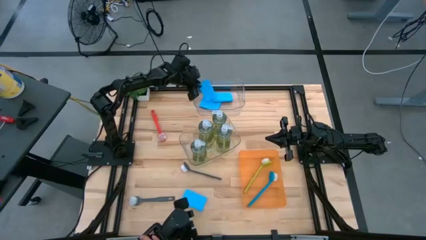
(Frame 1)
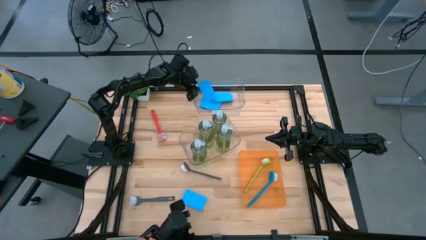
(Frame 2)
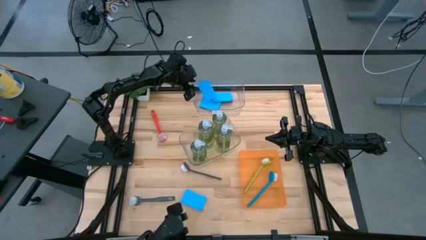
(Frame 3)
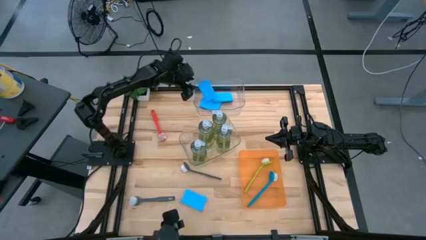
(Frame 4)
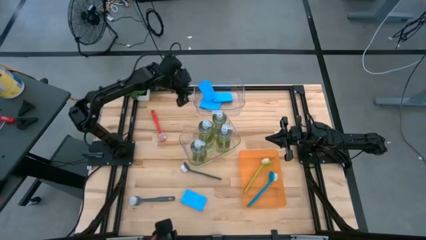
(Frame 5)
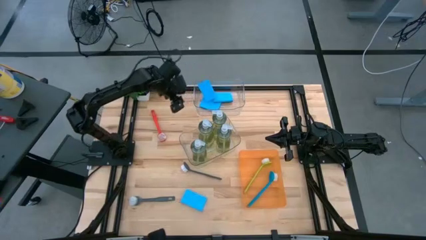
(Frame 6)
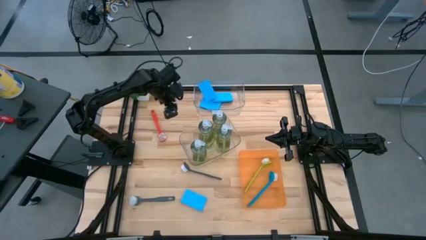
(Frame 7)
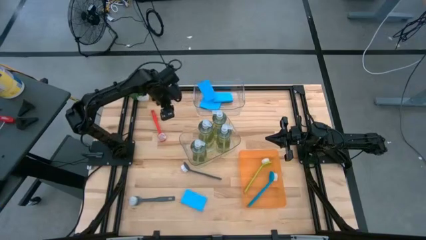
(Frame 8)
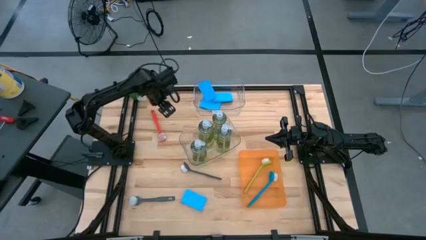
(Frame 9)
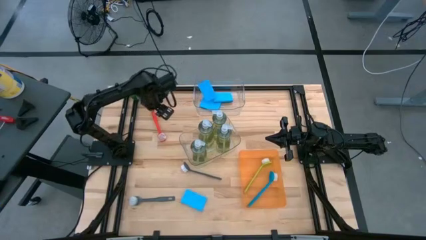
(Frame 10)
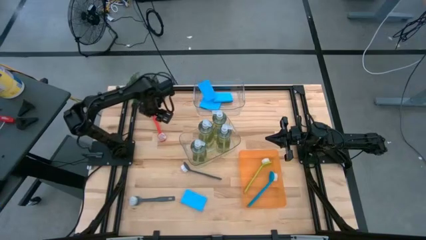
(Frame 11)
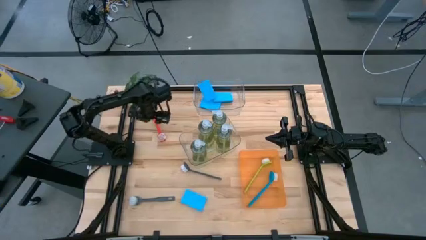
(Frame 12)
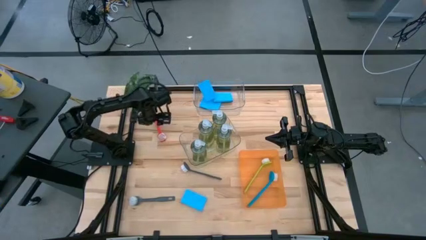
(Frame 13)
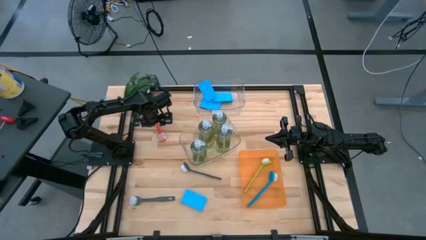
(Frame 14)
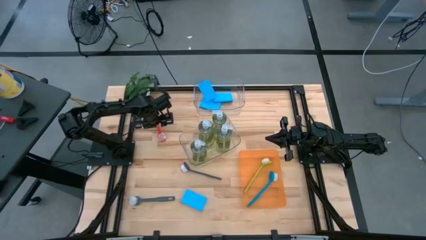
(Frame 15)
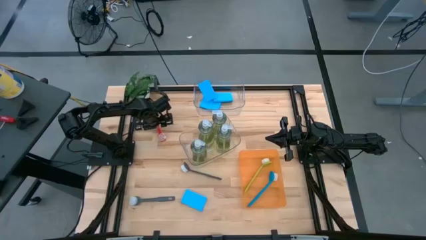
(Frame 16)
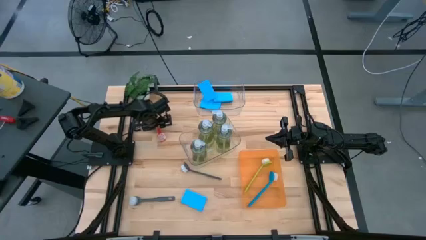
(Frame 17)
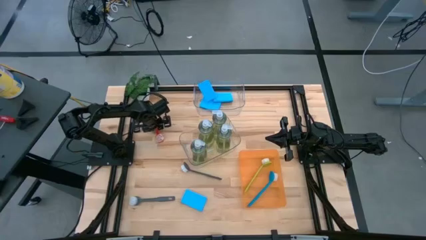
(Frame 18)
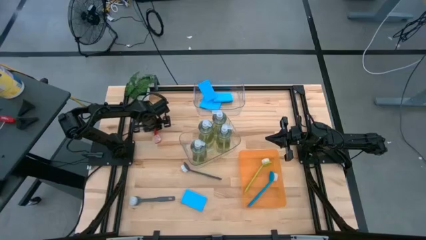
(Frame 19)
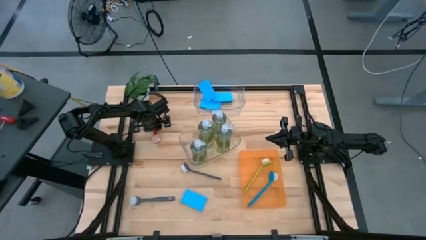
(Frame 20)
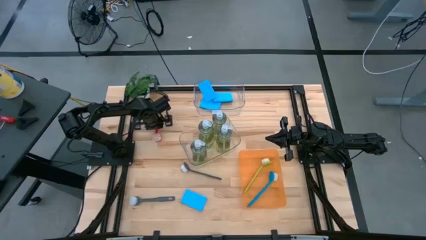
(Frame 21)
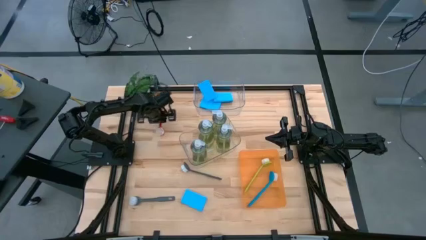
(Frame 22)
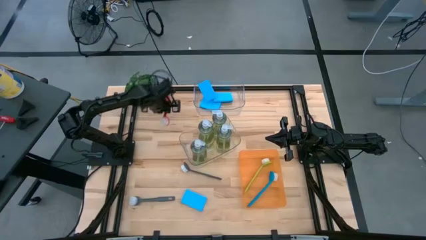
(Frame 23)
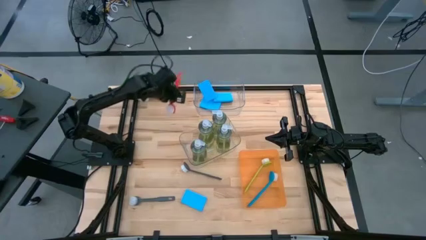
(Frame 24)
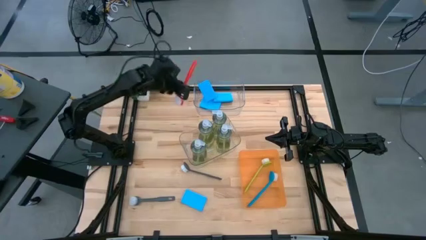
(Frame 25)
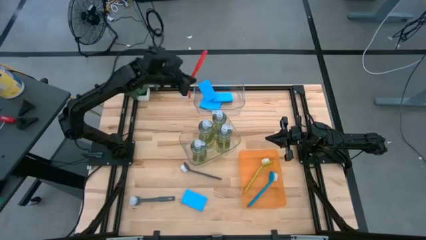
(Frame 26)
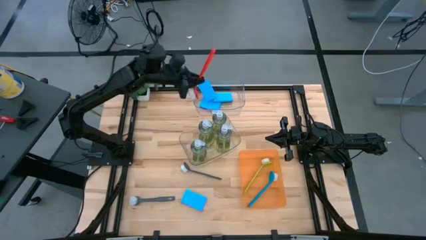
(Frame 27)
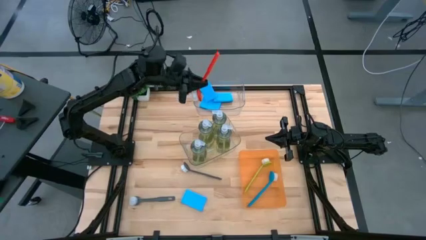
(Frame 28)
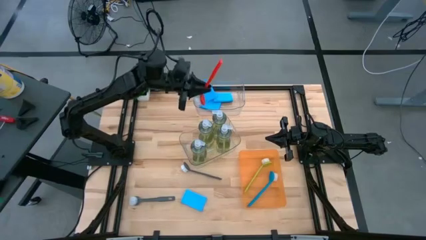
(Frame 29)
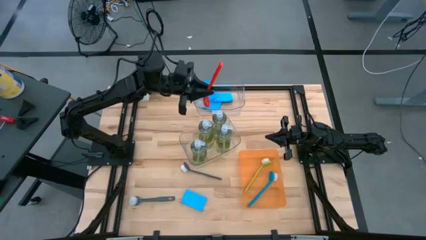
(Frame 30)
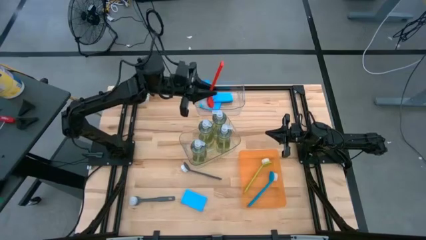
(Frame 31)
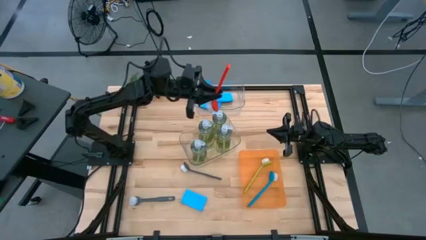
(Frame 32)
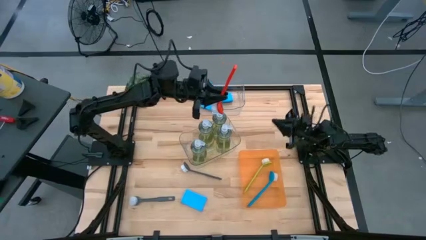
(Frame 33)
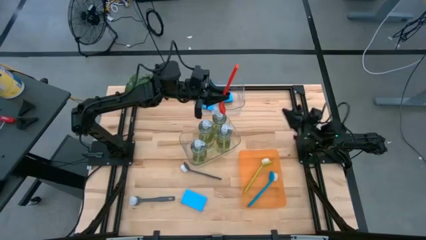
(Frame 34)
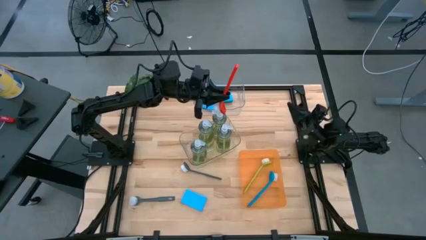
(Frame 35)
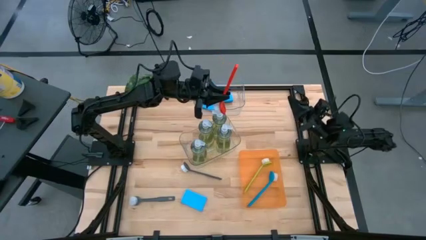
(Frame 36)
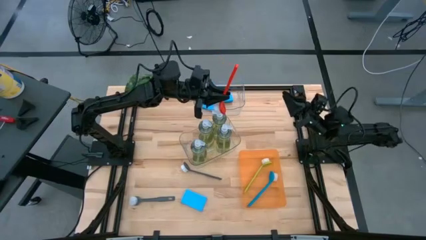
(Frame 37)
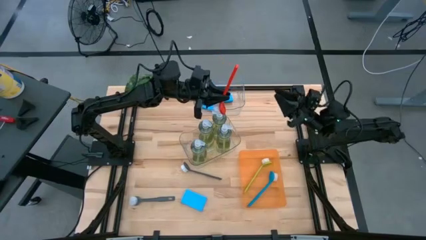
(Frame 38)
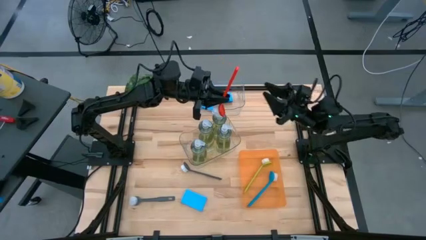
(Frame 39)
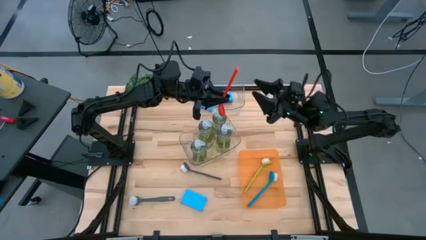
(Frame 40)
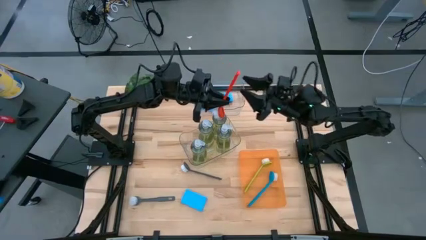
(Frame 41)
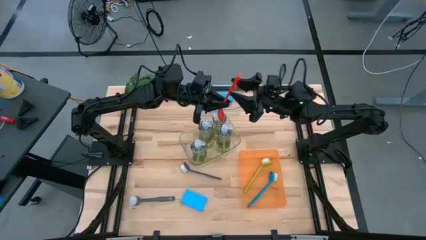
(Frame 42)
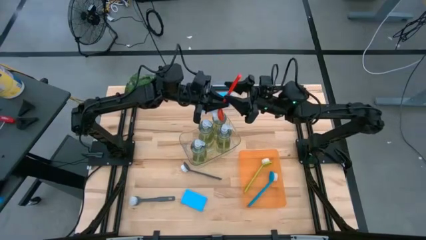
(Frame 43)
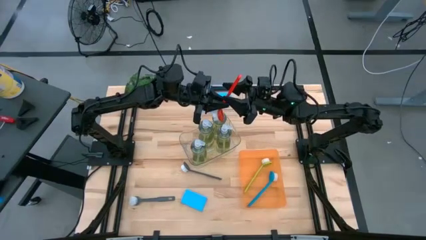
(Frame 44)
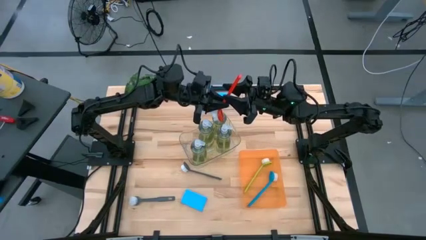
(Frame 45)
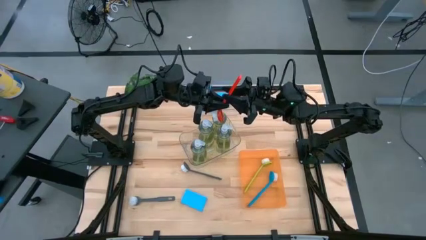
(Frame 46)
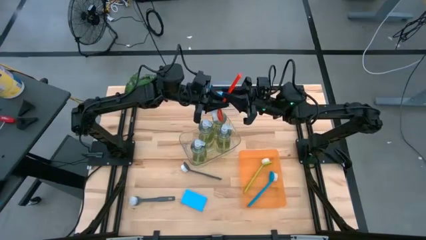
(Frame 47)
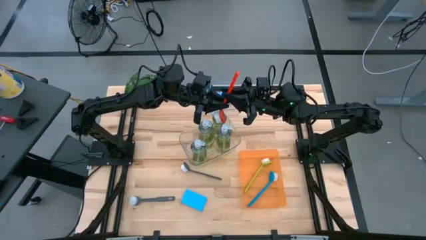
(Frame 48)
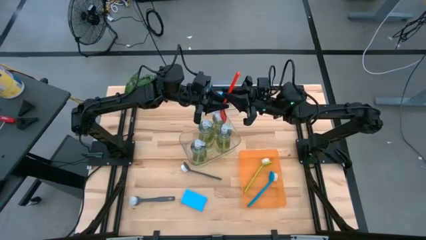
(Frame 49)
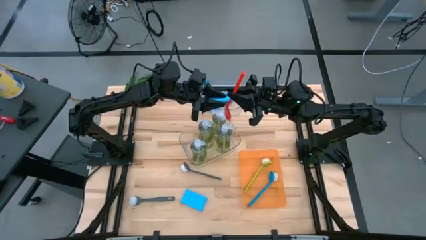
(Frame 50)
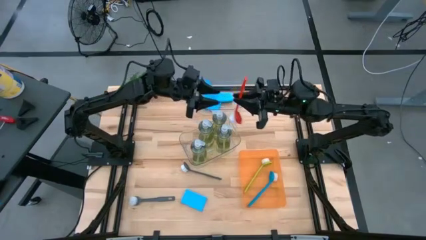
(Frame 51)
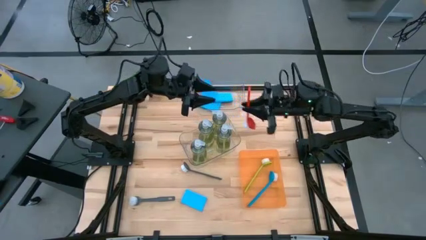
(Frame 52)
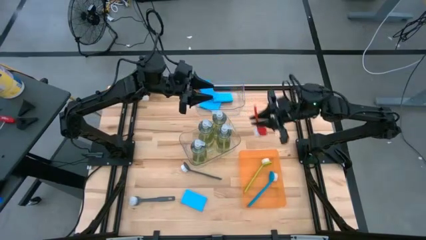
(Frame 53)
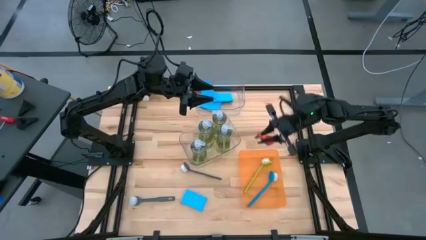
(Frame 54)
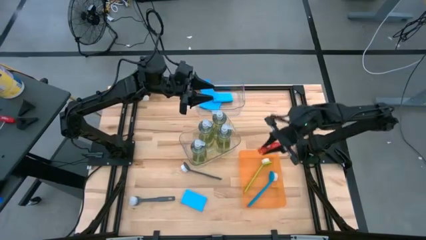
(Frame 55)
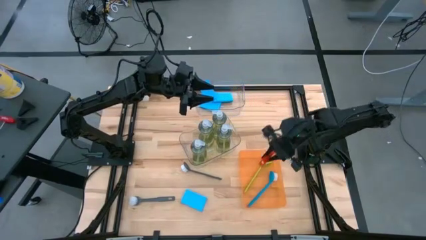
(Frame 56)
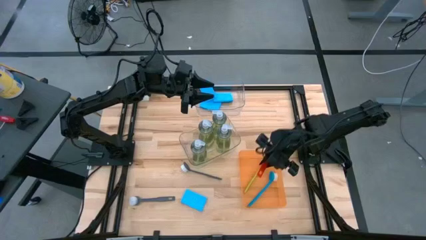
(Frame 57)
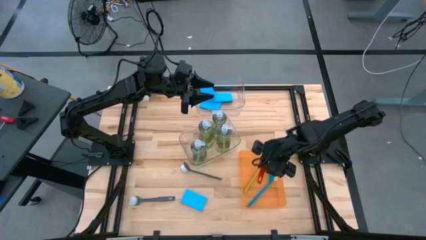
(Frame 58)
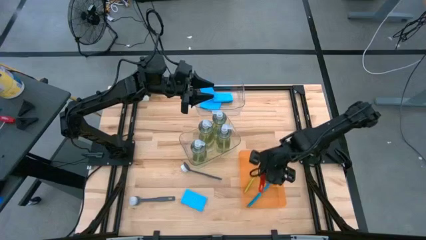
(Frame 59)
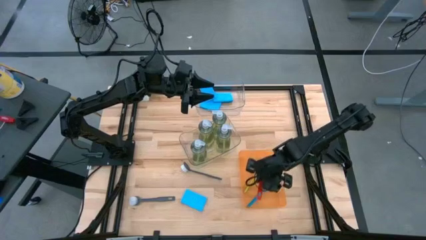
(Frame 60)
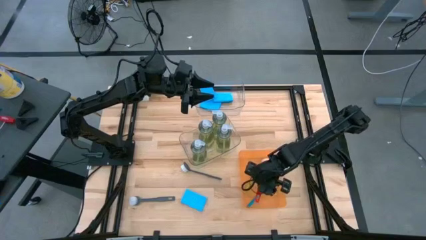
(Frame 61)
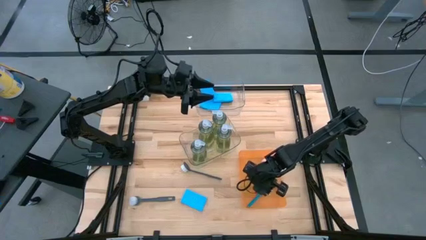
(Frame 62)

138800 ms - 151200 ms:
Task: Pick & Place Kitchen Sink Supplies
Put the orange dish brush into the orange bin
